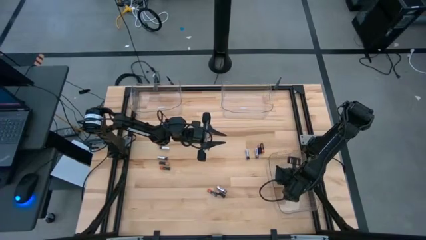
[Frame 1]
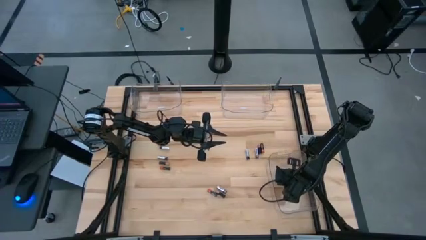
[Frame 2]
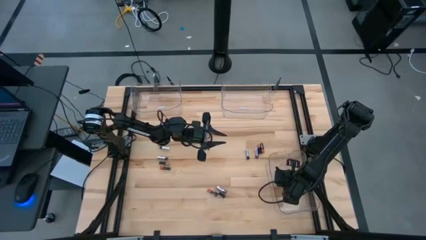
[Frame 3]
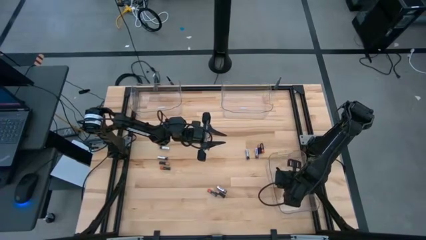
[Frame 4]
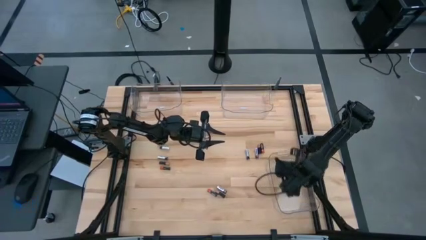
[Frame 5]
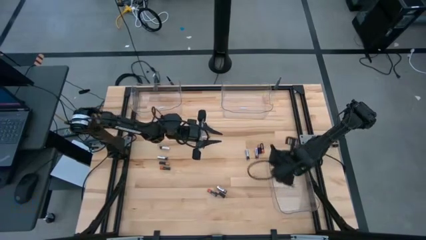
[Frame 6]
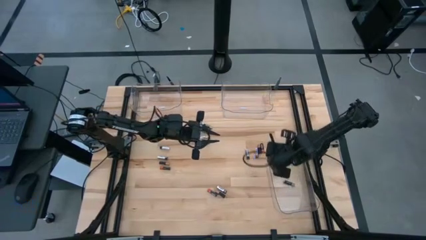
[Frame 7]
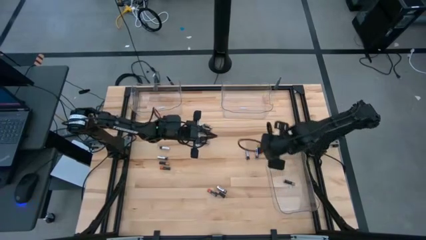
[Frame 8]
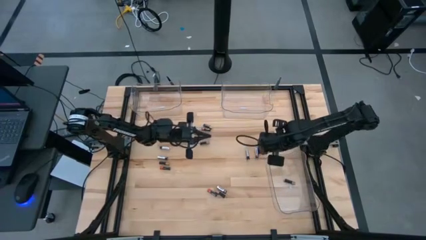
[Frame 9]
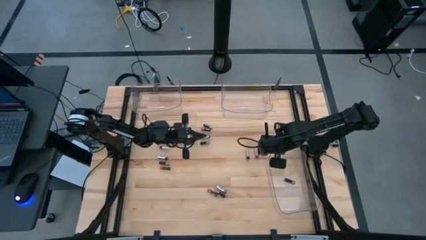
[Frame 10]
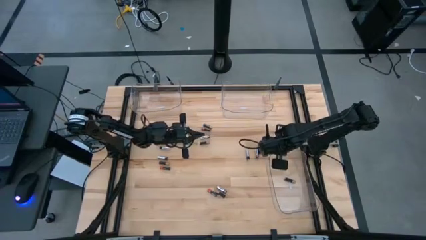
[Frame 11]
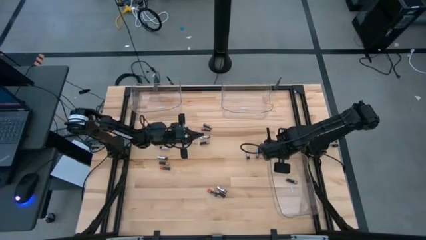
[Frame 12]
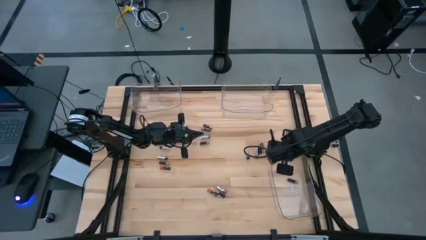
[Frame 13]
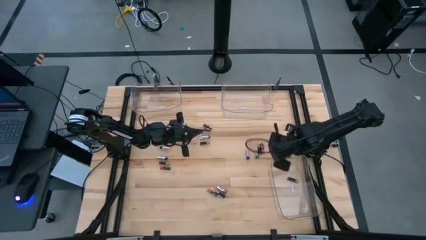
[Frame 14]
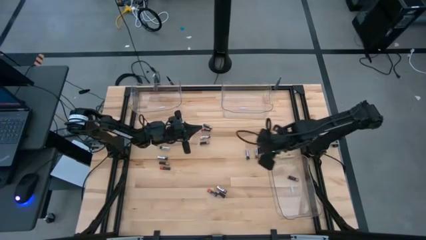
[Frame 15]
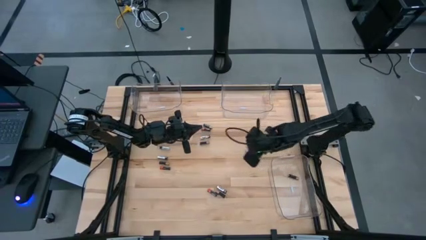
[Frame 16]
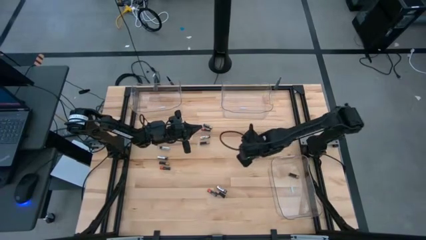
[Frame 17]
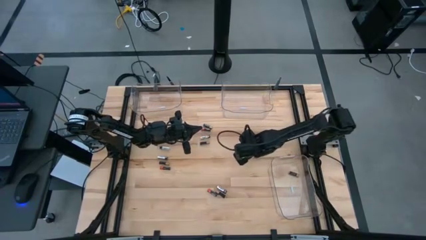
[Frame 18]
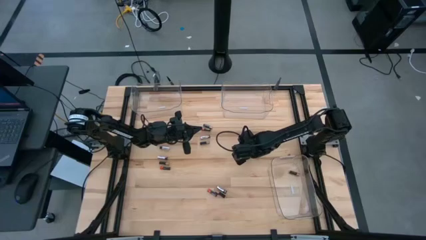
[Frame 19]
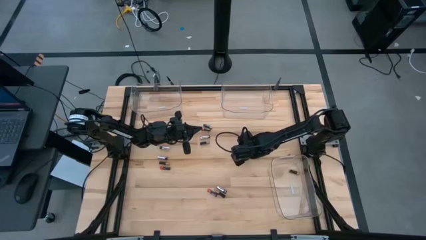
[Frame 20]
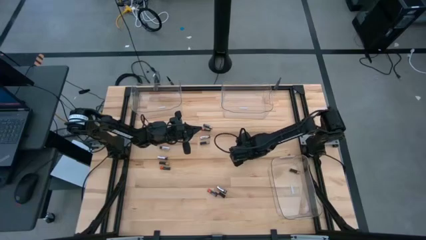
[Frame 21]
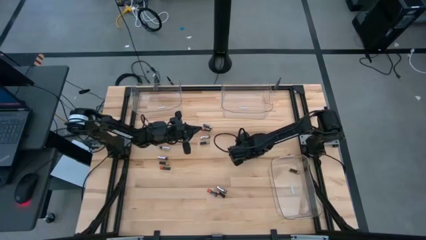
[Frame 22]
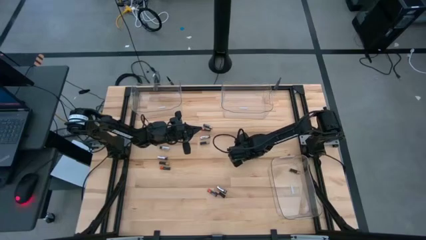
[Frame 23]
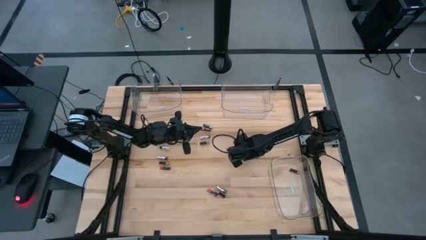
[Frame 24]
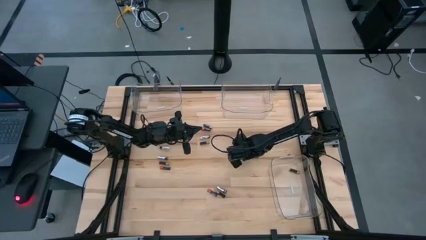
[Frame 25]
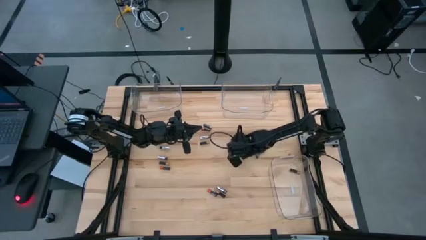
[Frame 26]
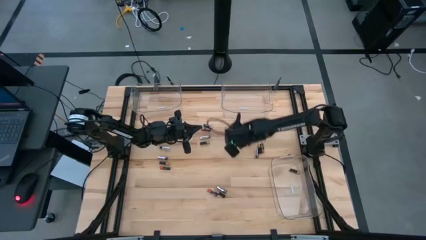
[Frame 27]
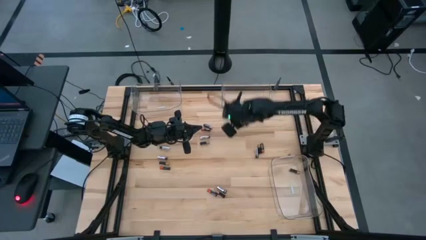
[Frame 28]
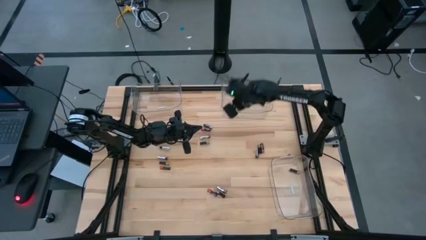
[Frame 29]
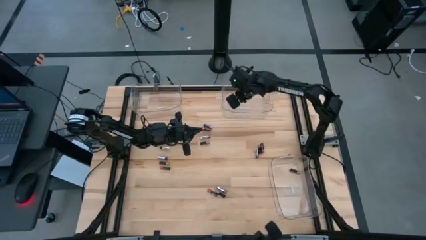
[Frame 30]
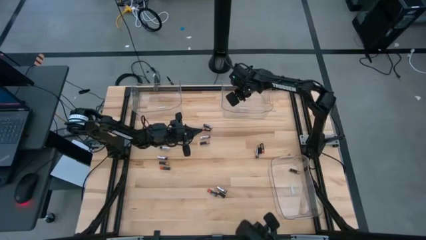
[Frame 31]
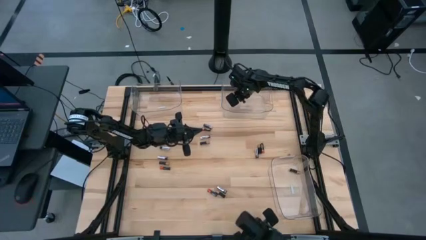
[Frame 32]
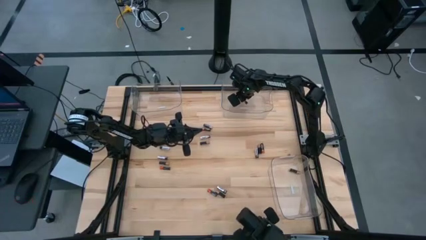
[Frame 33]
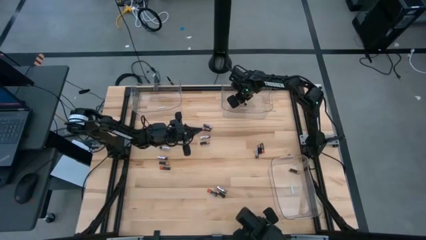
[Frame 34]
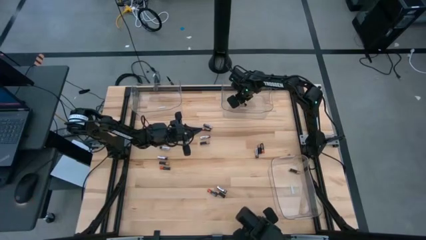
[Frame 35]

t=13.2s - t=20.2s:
Task: Sort batteries
Put the silver battery into the top right transparent bin

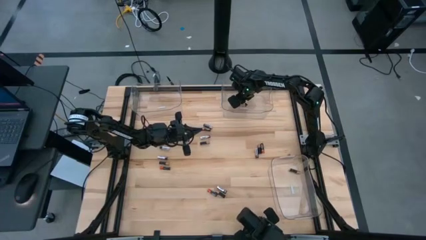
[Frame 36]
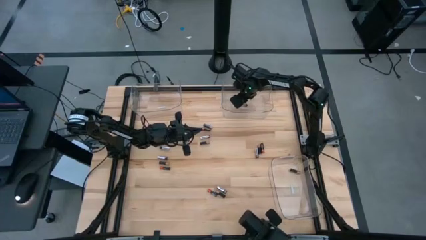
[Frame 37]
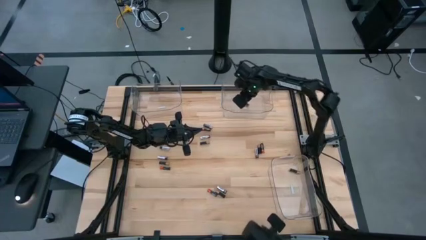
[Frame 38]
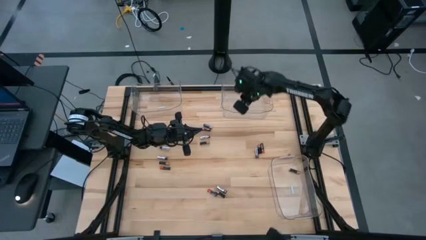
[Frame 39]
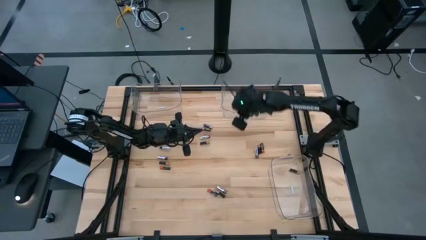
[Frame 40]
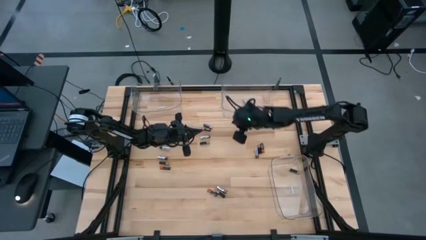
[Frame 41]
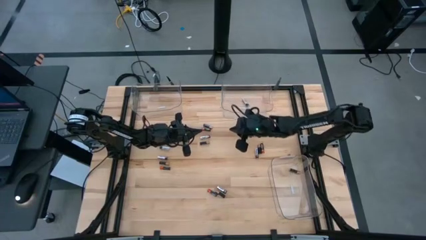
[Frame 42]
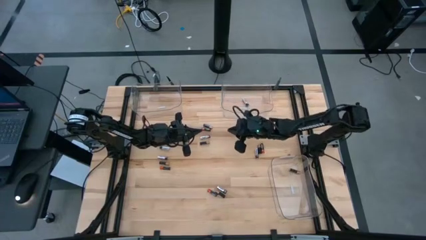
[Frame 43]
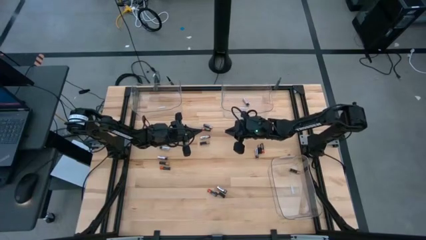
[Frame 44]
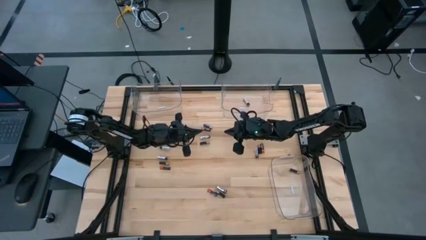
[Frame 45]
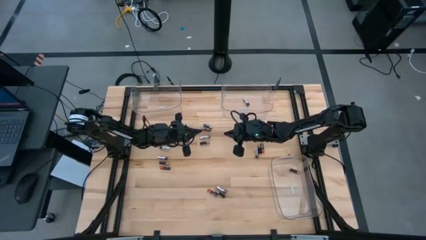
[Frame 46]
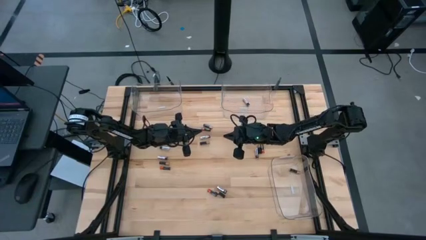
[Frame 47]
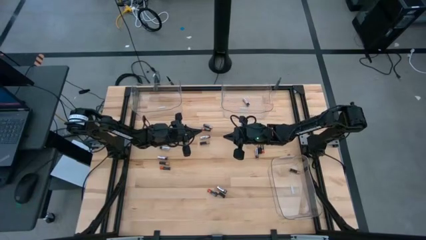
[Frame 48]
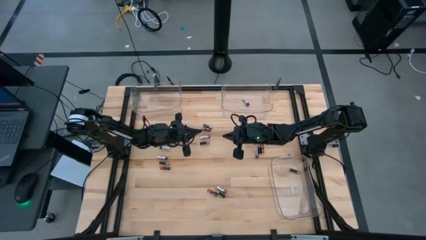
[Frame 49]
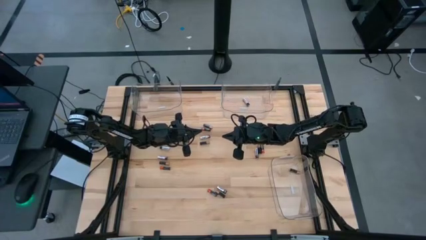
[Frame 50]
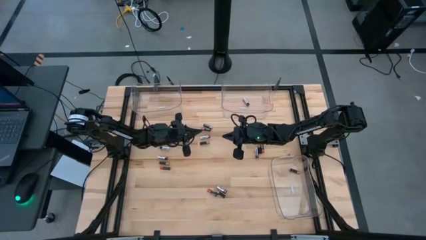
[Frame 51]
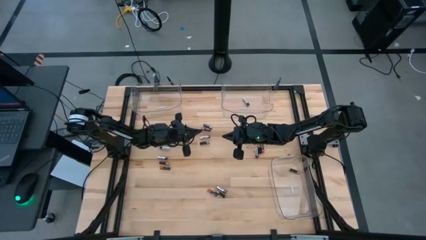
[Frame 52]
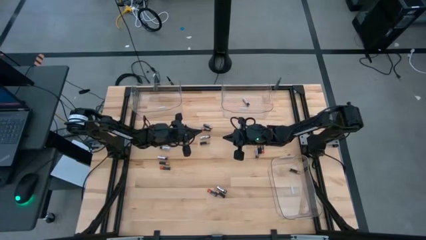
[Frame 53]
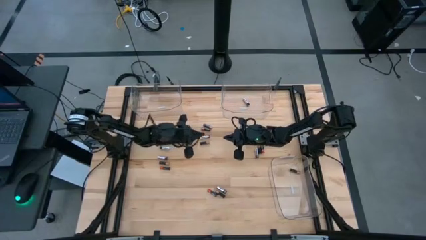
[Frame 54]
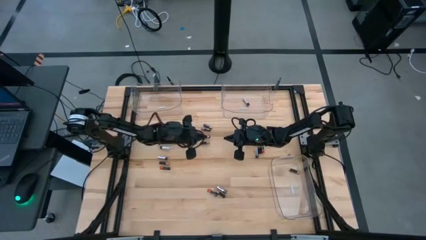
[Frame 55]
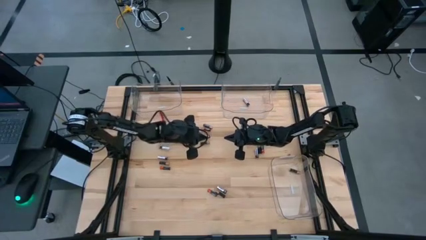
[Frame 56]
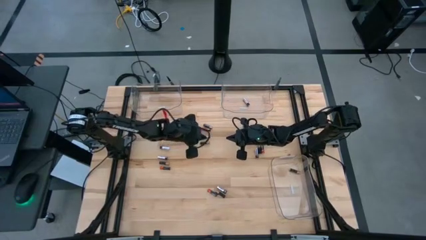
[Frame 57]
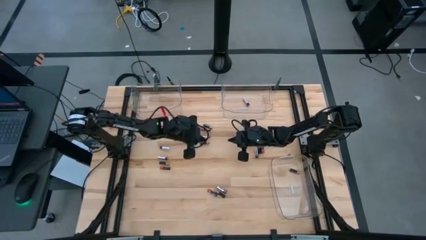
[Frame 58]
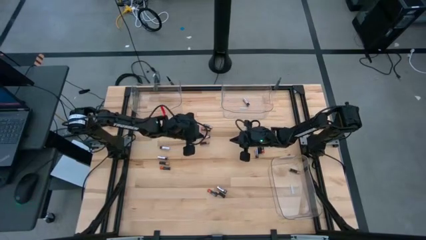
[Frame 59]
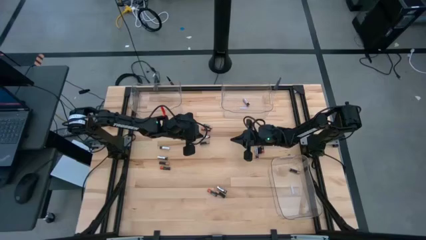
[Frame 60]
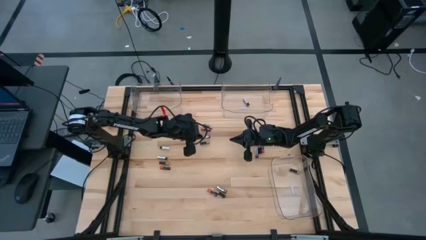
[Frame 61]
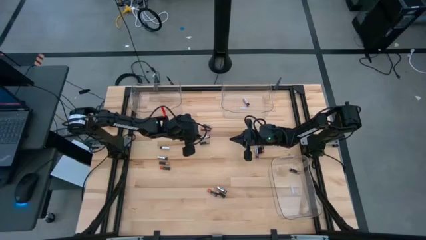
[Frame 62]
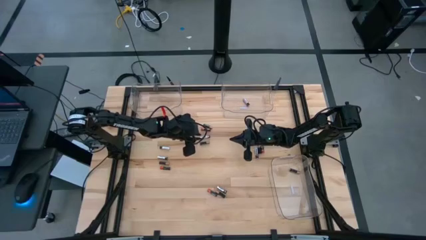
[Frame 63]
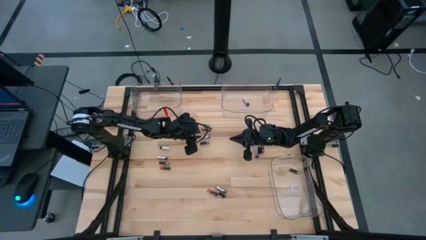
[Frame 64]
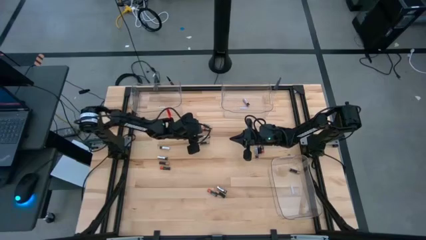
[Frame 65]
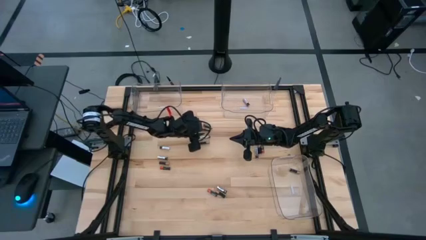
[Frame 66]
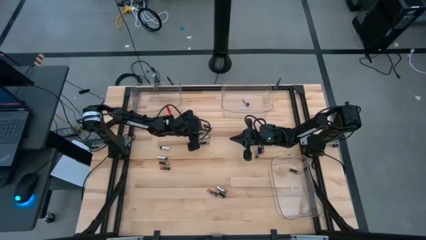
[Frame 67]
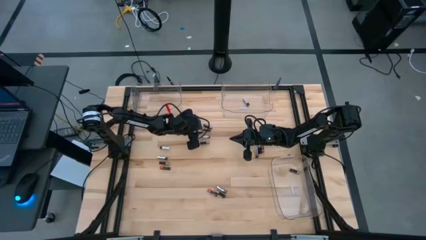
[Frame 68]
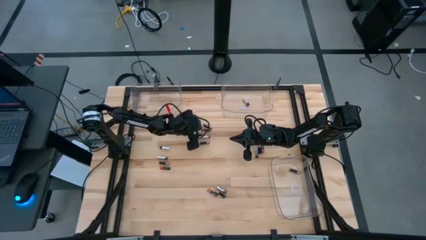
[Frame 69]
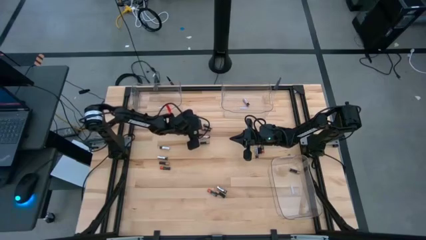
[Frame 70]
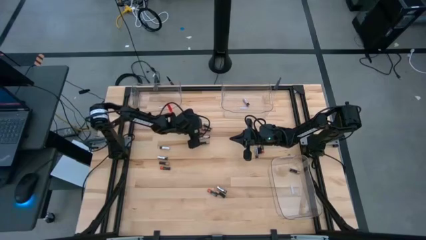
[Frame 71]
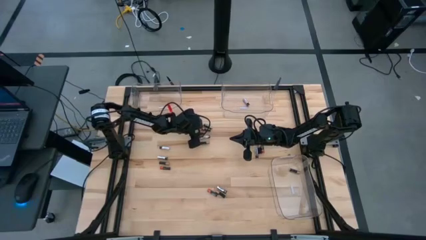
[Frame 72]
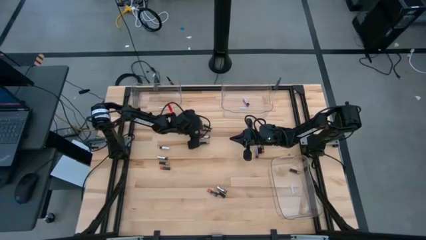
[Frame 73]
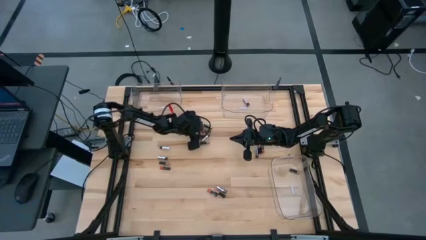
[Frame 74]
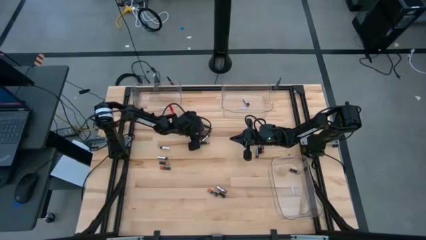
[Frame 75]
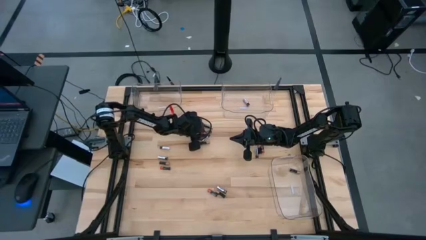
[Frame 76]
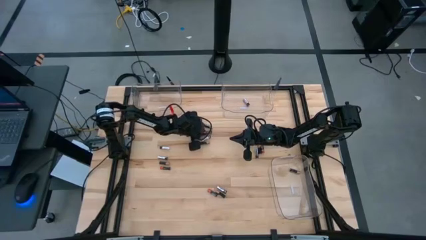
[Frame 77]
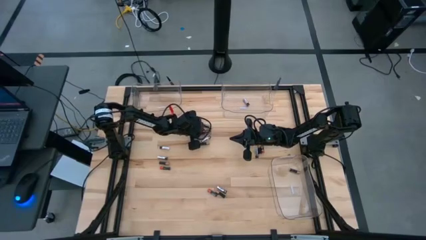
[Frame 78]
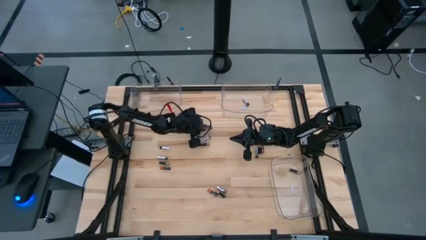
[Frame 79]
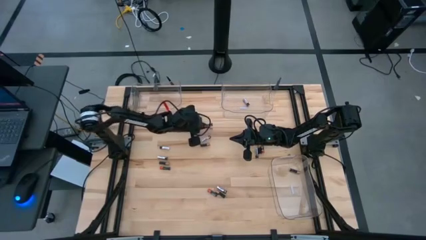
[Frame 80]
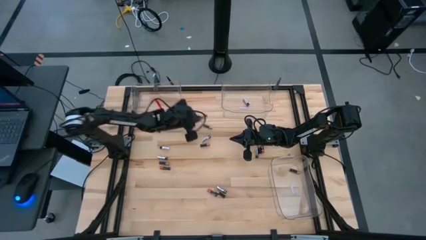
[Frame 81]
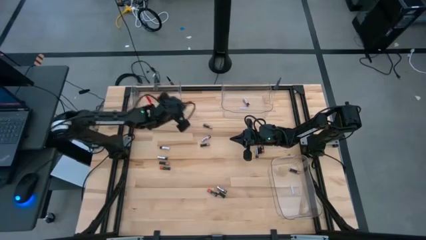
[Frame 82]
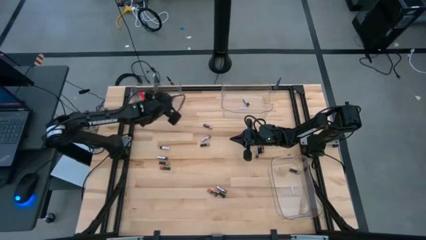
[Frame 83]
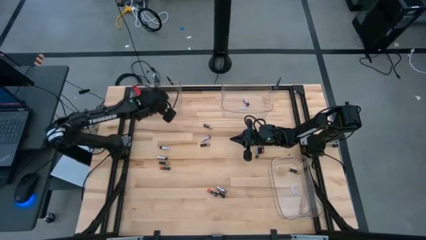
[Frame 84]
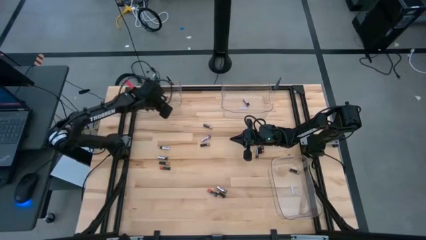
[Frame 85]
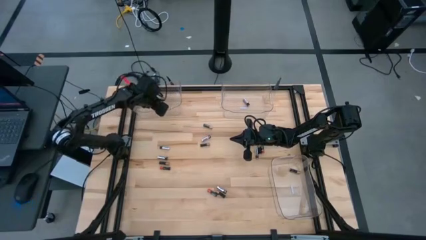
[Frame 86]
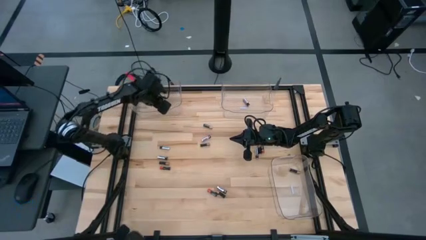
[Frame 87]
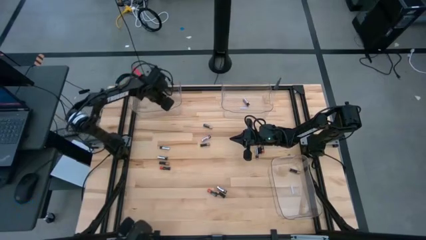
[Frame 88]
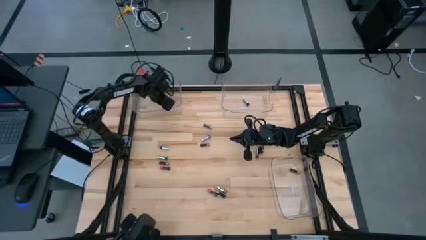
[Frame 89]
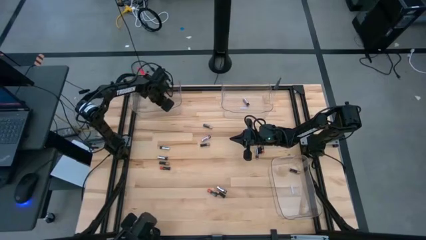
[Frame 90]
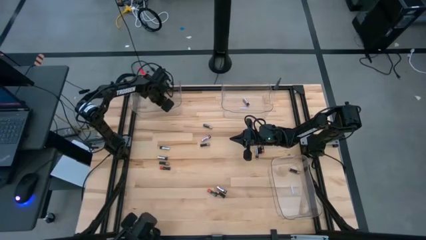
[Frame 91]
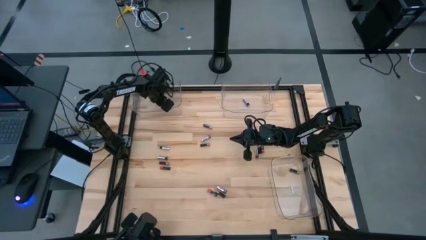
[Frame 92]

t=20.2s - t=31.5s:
Put the red battery into the top left transparent bin
